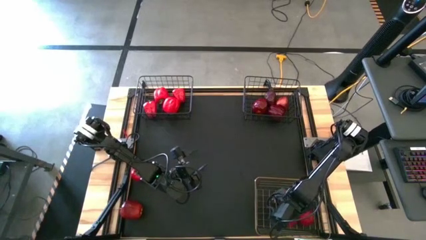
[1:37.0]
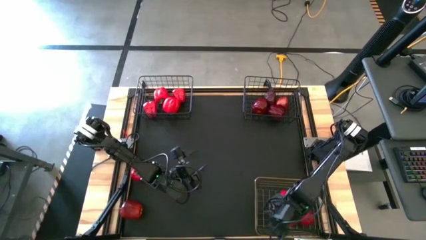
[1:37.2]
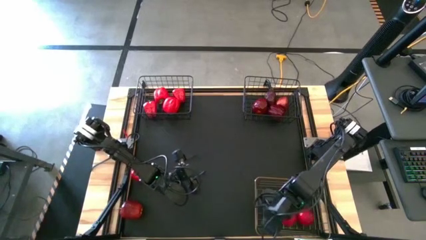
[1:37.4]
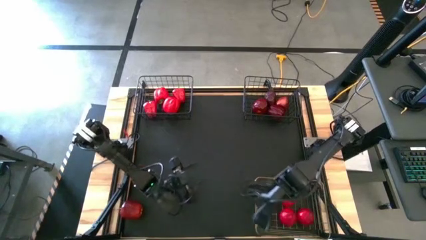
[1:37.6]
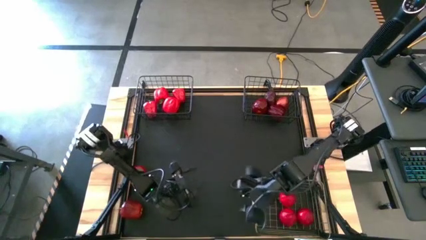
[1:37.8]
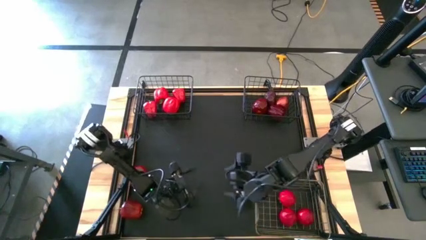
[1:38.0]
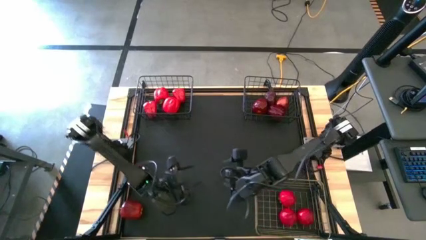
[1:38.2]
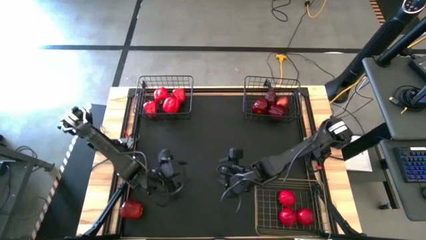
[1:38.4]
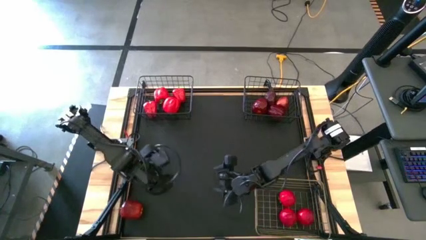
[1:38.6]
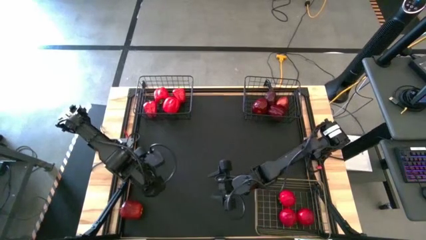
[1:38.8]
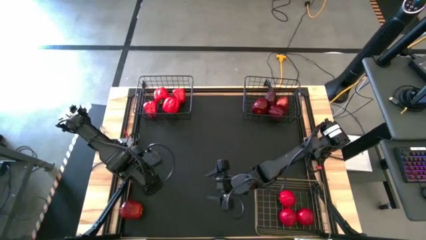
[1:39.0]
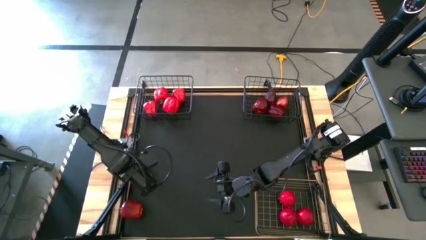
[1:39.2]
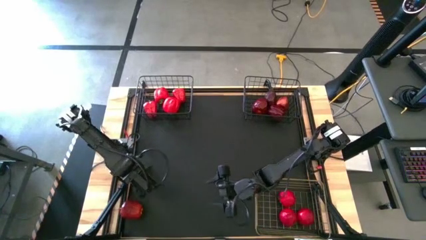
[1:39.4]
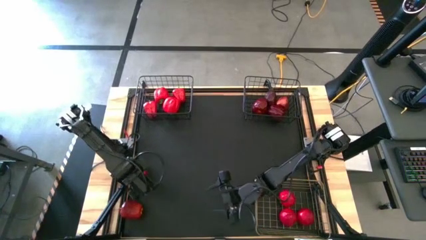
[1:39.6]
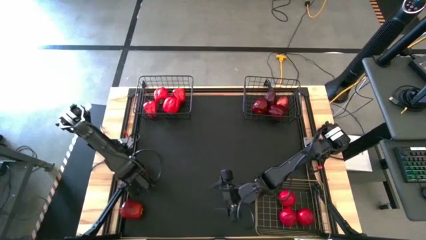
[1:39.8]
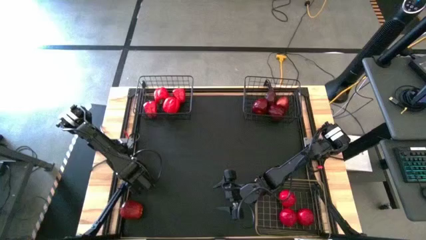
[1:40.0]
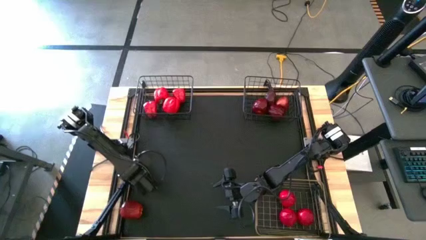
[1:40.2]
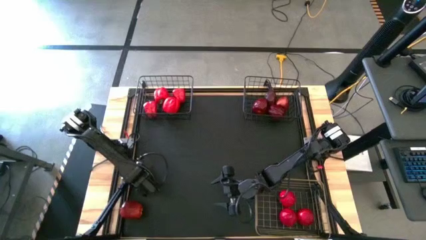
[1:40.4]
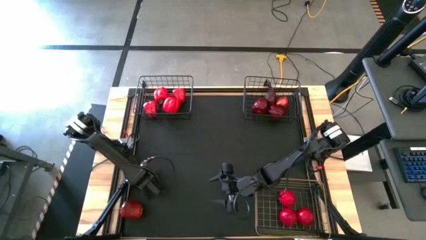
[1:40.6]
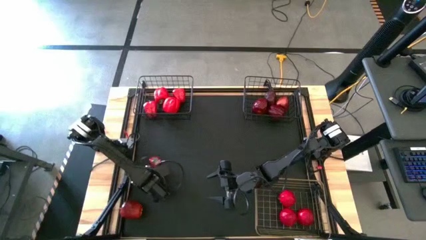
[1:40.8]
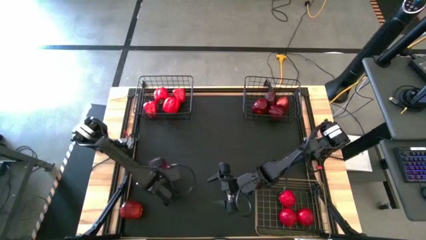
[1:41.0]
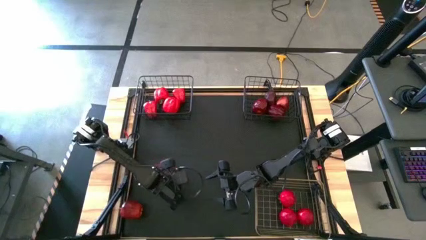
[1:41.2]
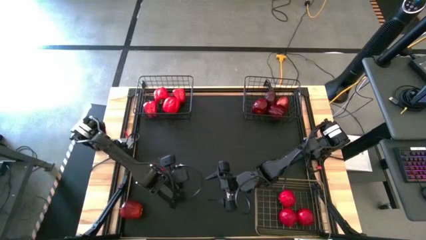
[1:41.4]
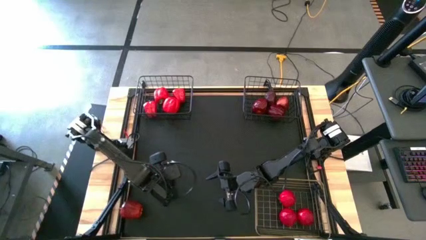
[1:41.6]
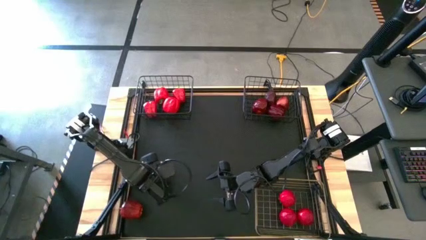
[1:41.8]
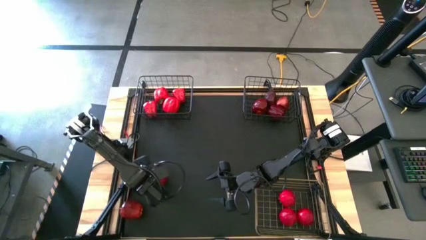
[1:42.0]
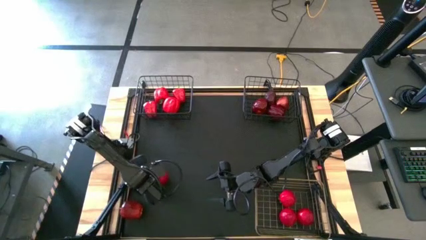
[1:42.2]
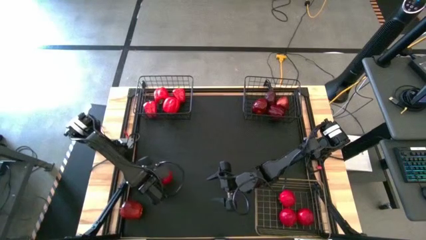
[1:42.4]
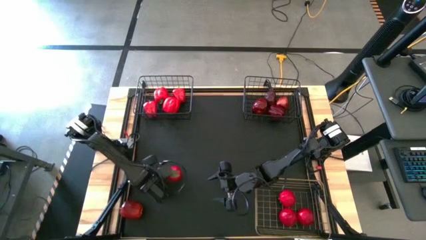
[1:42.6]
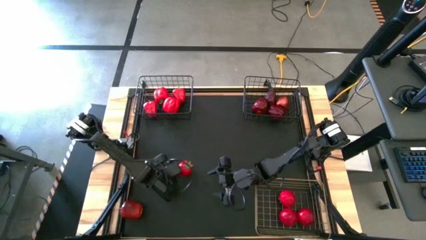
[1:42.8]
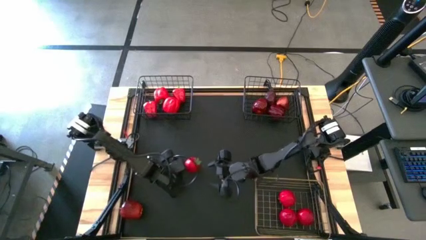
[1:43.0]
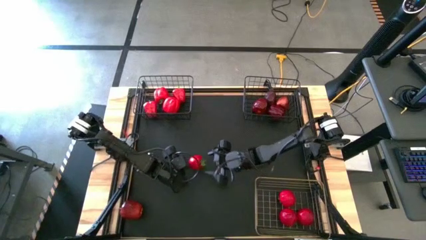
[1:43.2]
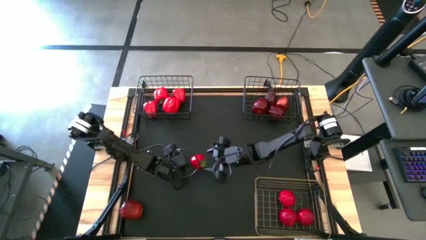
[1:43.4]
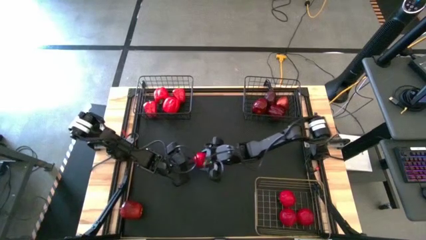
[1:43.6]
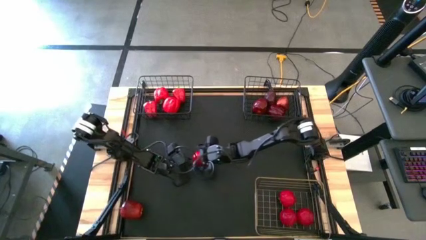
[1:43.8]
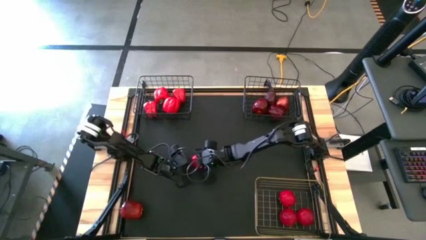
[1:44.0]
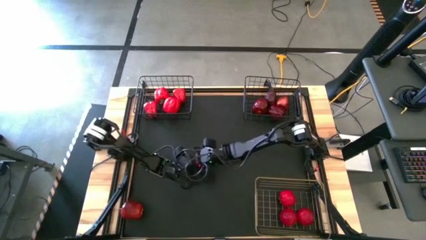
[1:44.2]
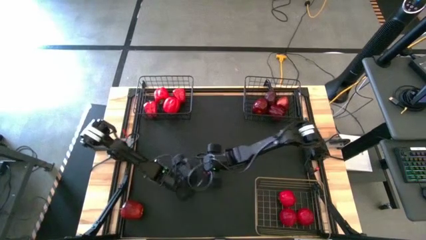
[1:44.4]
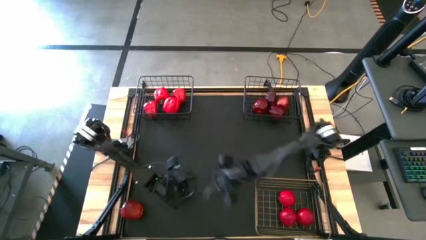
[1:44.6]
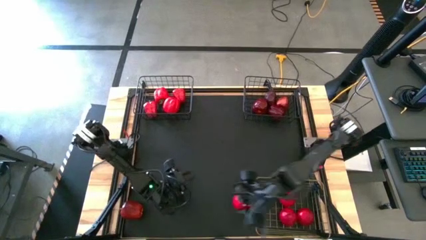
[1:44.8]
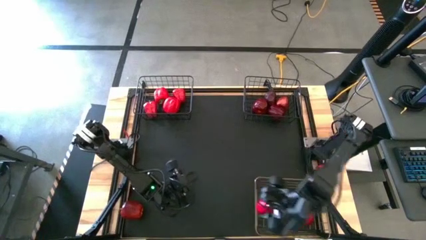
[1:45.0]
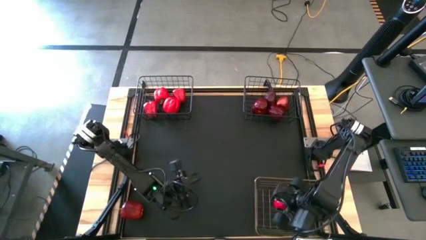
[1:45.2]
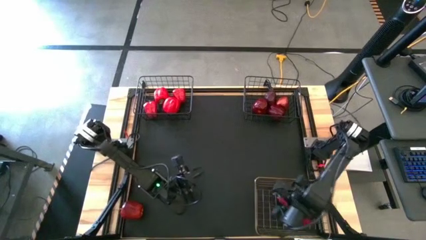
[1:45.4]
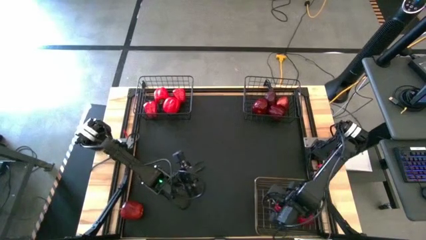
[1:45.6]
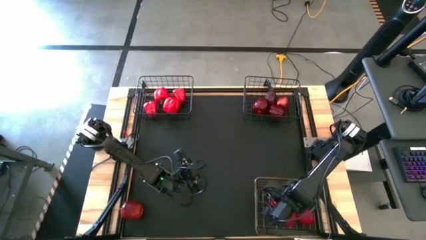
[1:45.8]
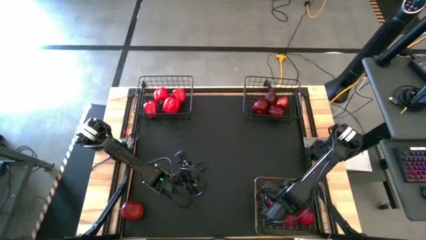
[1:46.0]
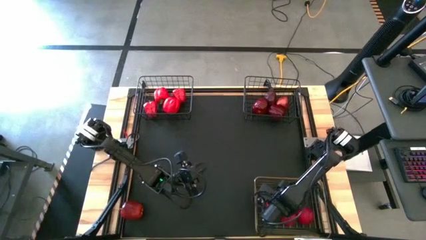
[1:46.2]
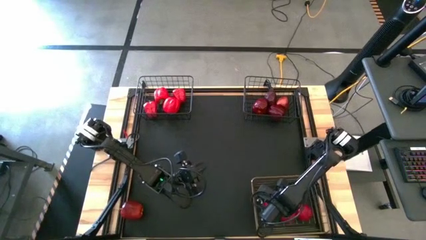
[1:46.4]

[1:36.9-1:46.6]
Task: Sort produce into baskets
Put the tomato into the gold wire basket

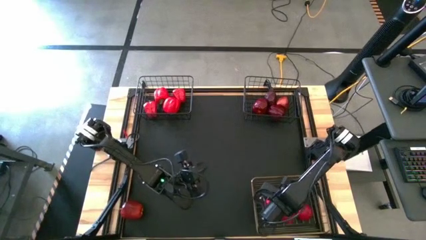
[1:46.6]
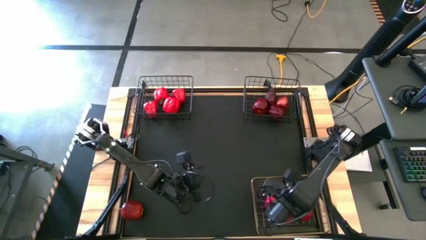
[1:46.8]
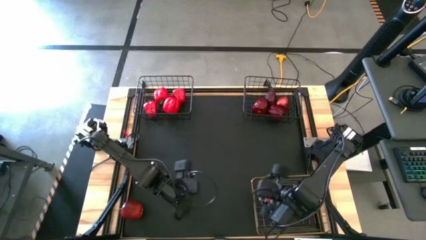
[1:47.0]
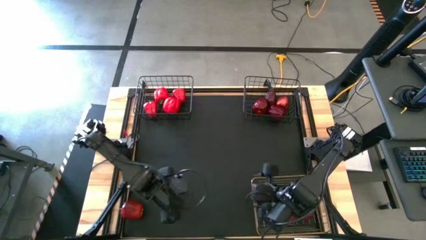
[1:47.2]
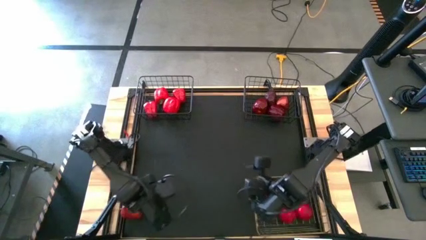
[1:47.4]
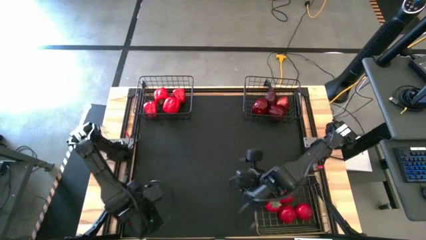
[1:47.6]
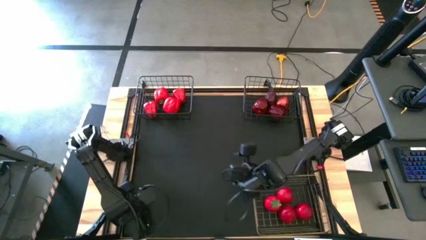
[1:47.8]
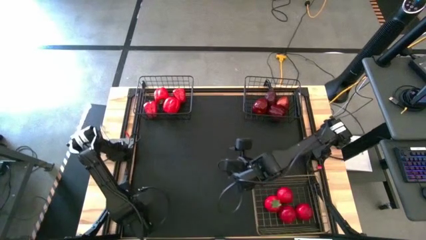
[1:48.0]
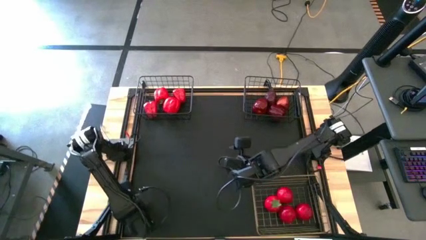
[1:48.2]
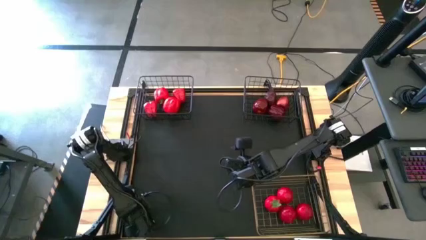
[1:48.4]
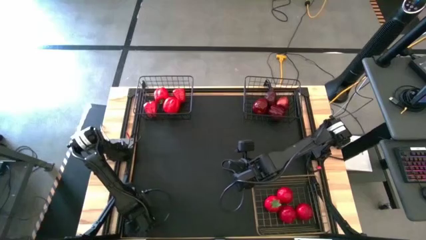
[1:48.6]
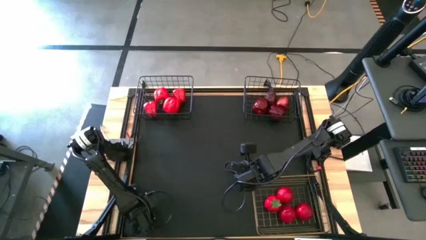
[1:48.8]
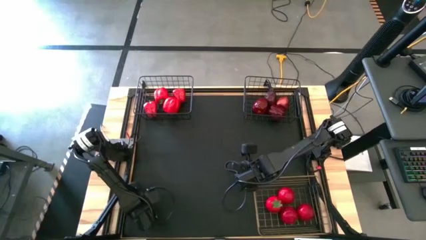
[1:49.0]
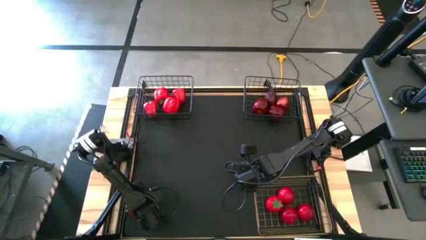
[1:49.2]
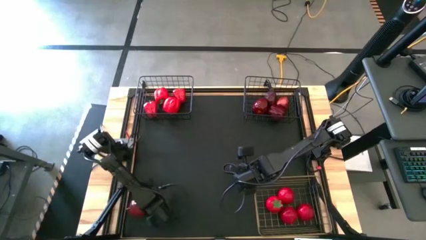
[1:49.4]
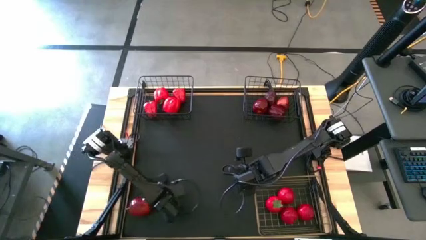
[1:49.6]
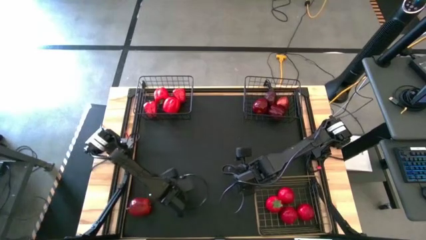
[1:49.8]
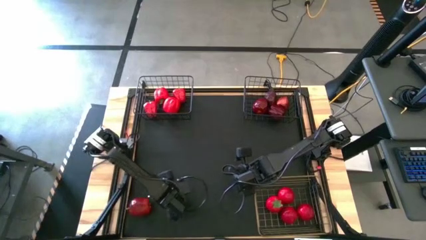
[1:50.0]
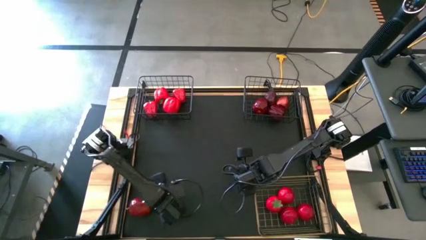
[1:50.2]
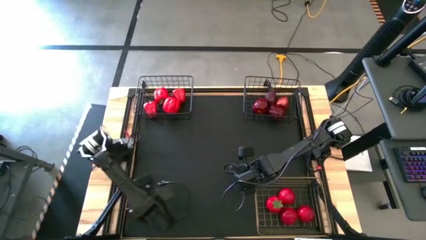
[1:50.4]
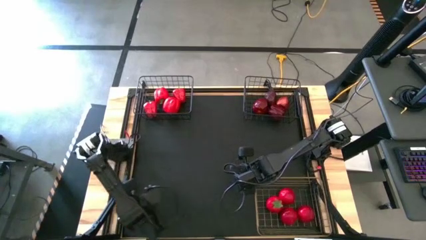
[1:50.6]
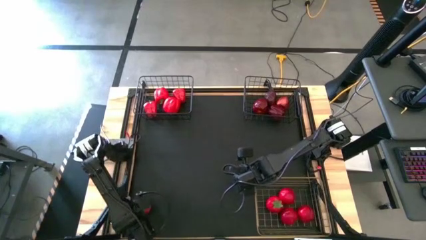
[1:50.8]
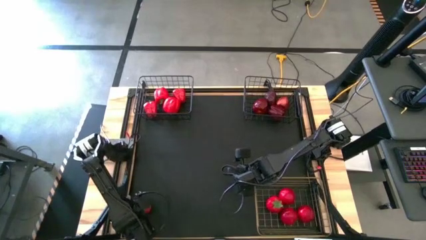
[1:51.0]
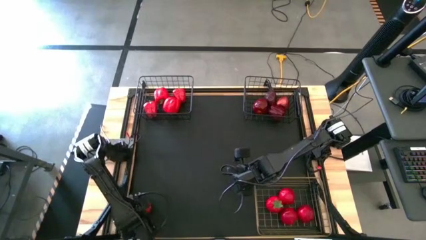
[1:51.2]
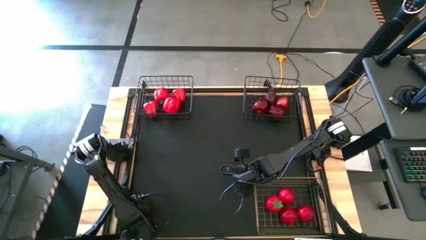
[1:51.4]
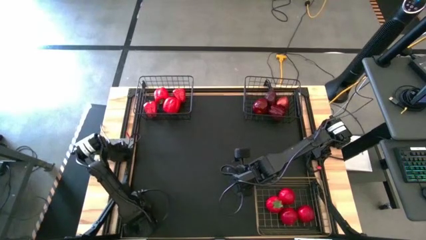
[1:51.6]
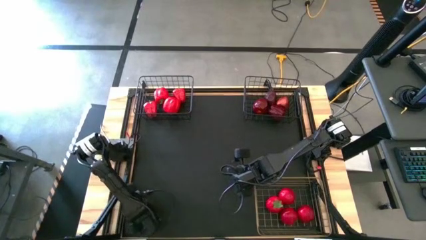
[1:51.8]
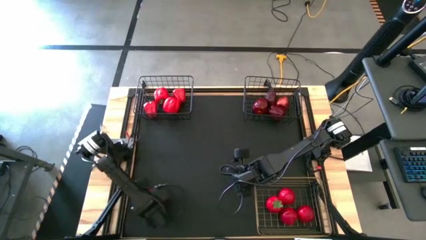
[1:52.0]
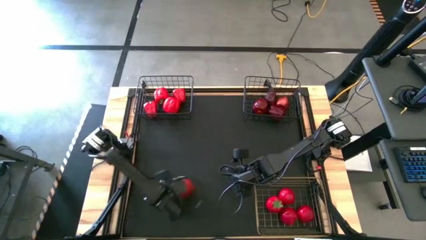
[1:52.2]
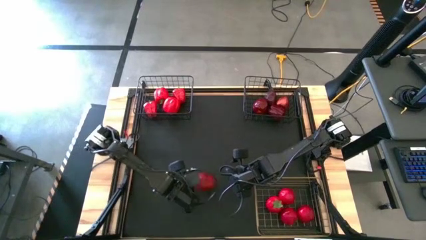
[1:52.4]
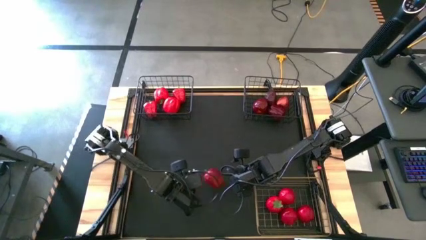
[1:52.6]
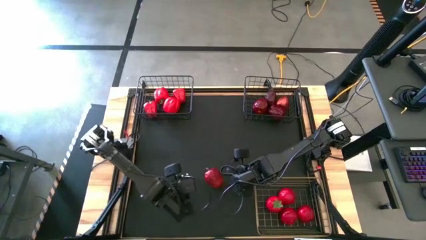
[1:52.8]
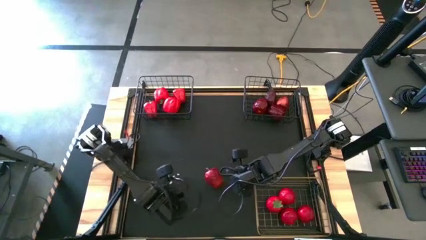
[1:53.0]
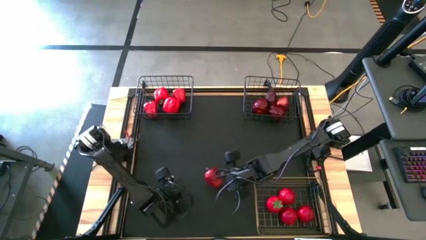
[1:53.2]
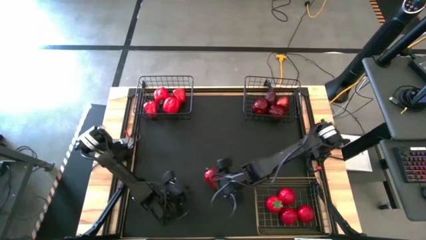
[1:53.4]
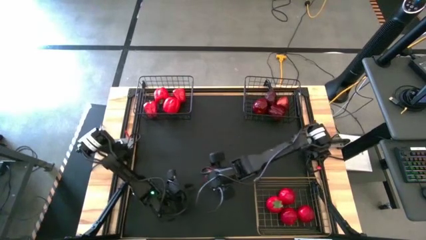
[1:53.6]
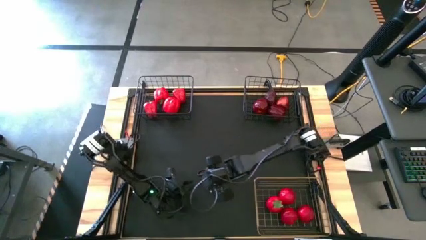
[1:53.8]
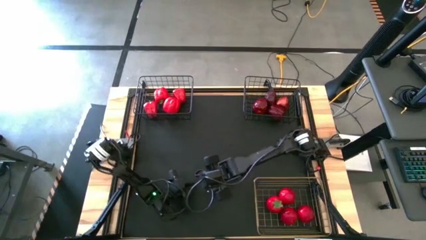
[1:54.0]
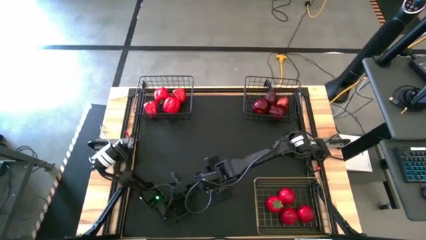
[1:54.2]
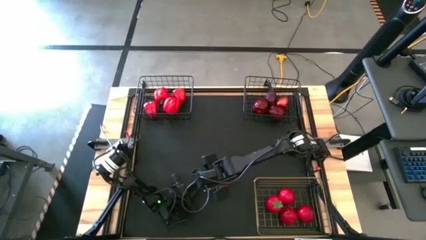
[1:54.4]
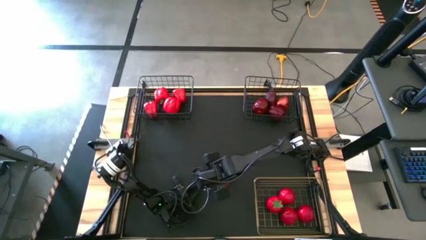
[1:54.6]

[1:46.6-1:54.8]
Put the apple into the right black wire basket
